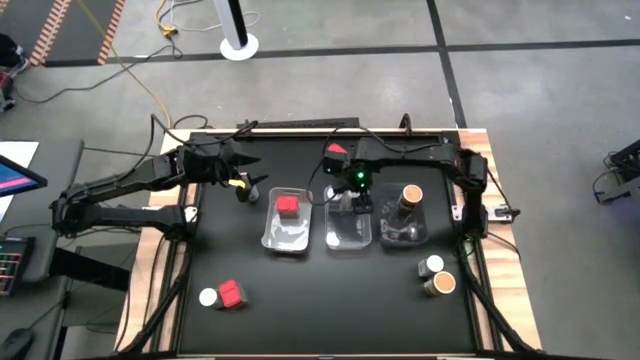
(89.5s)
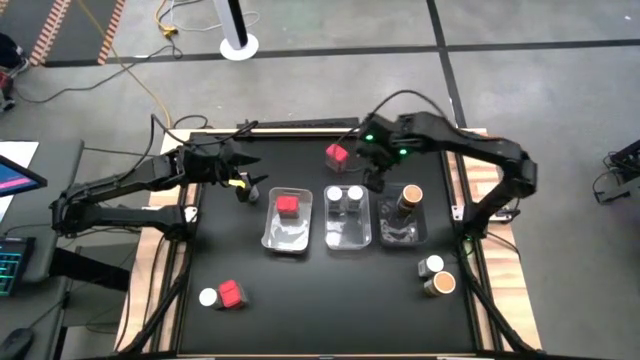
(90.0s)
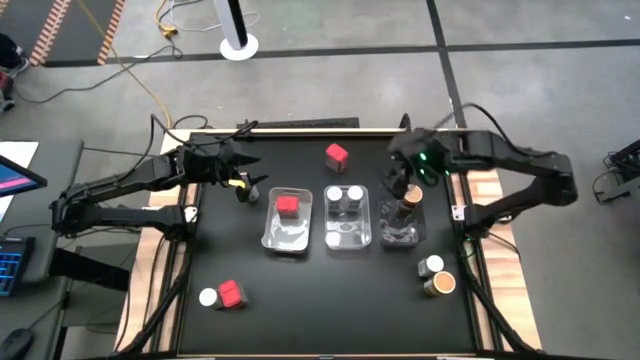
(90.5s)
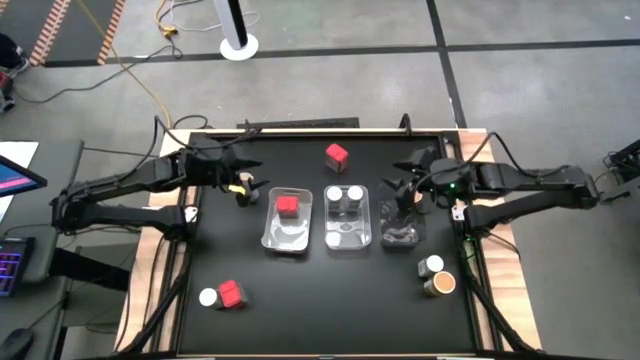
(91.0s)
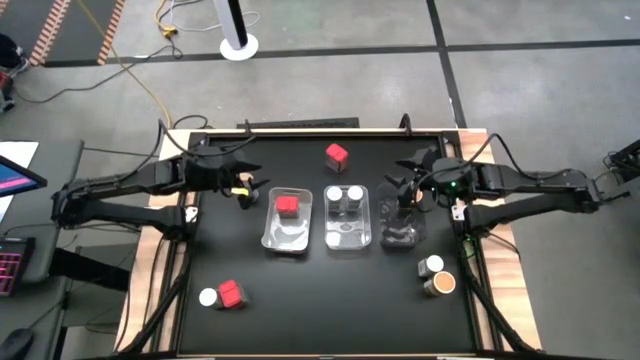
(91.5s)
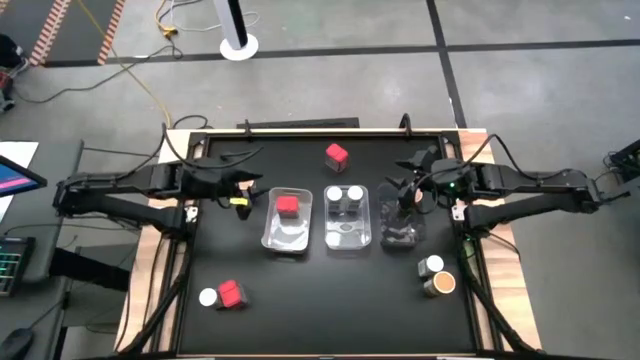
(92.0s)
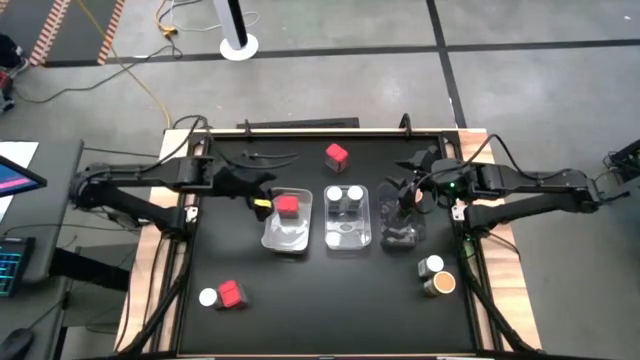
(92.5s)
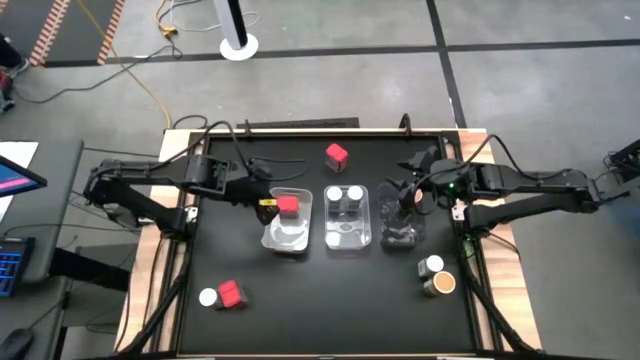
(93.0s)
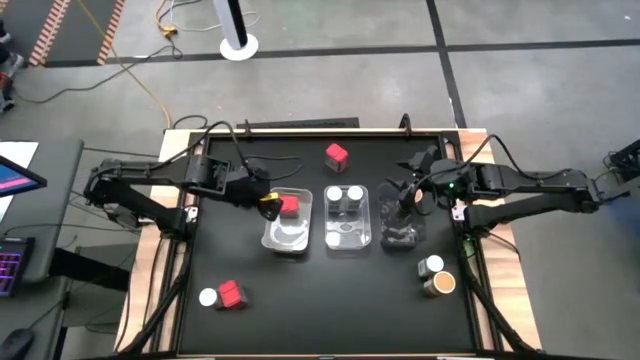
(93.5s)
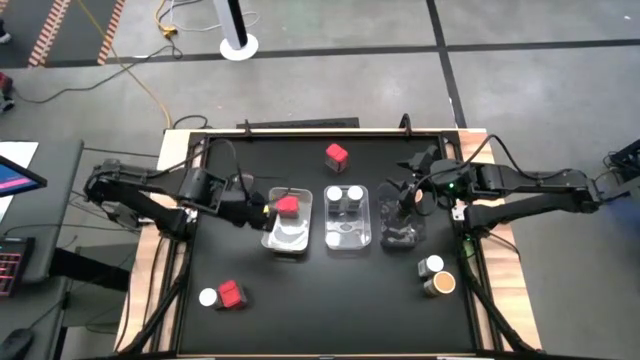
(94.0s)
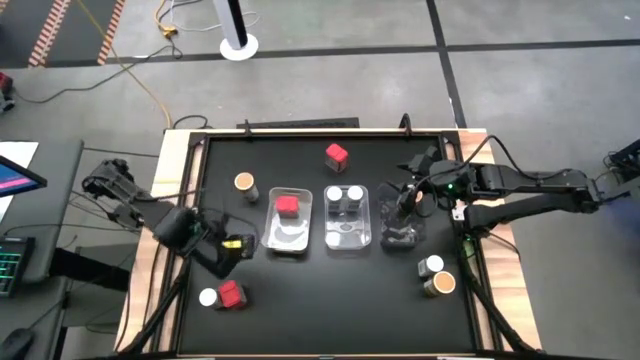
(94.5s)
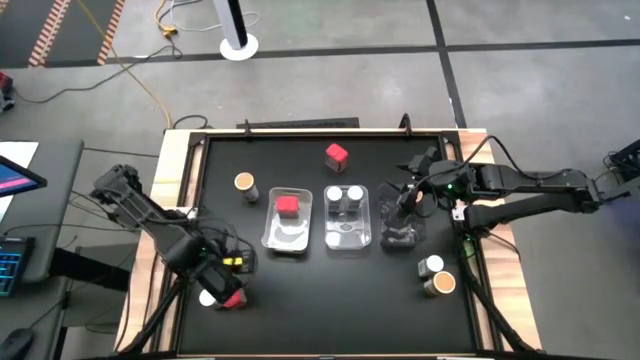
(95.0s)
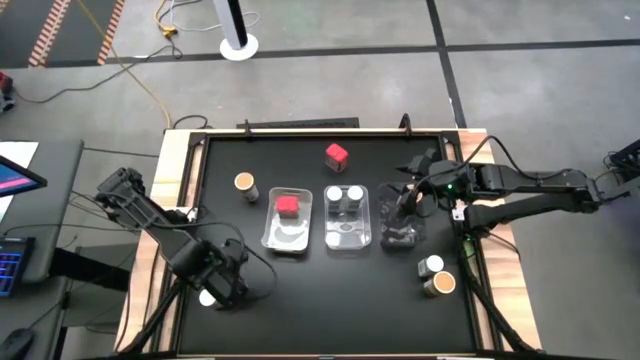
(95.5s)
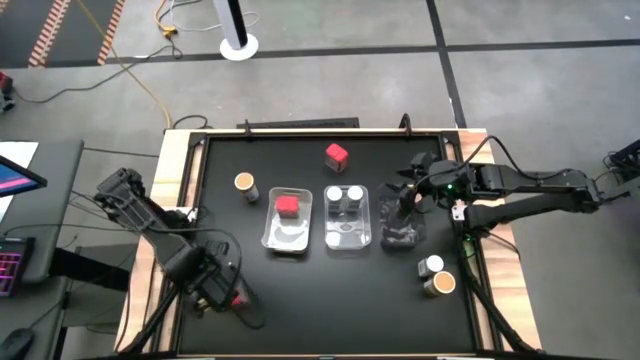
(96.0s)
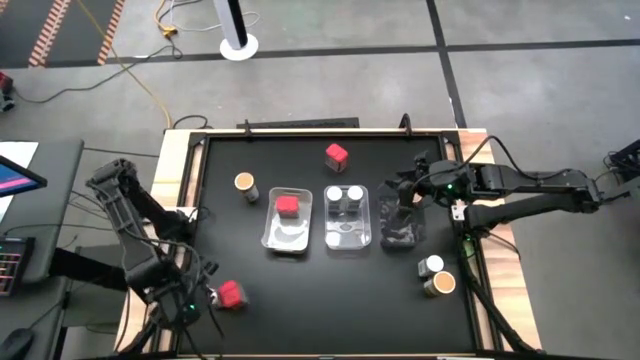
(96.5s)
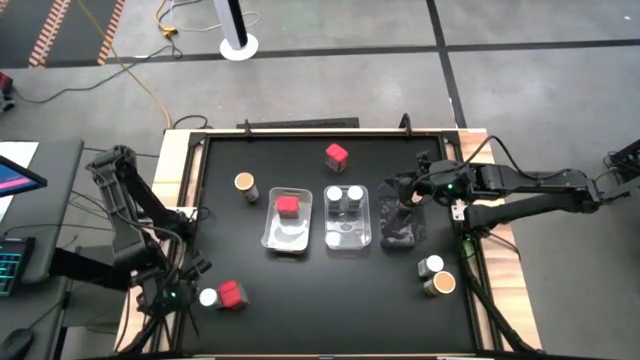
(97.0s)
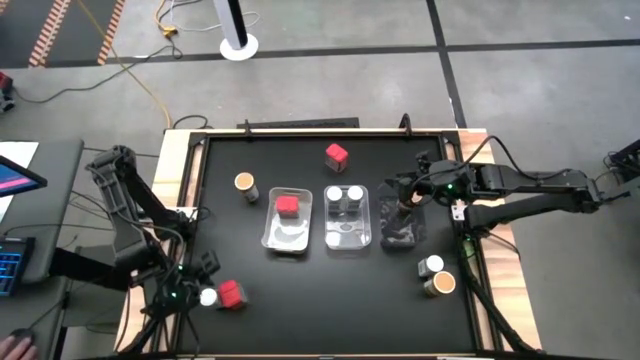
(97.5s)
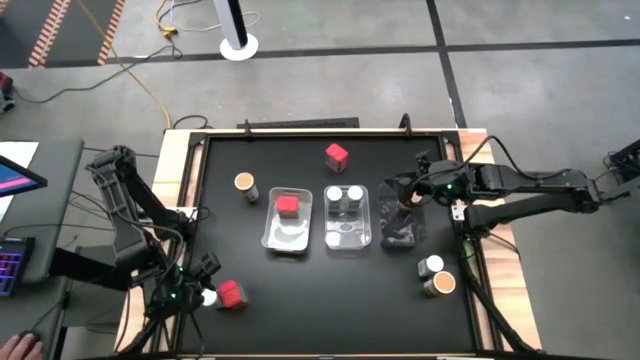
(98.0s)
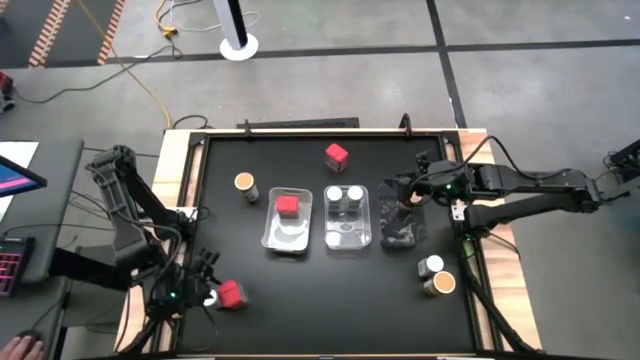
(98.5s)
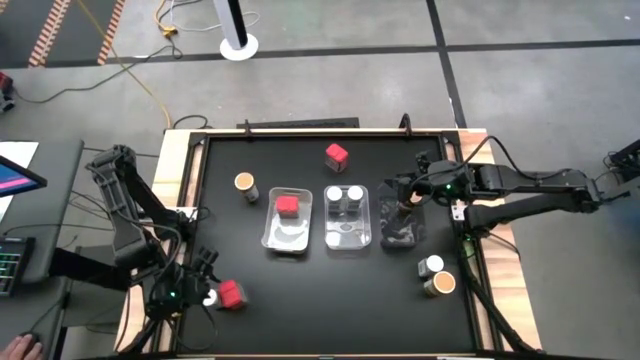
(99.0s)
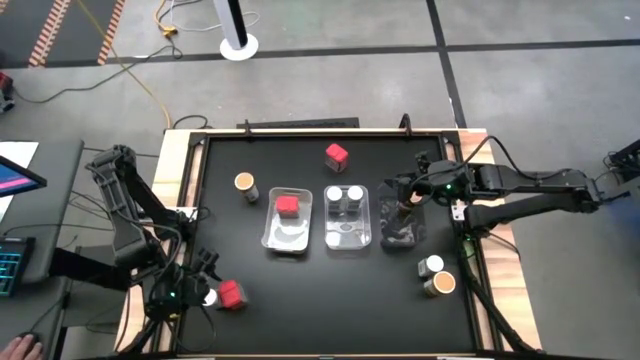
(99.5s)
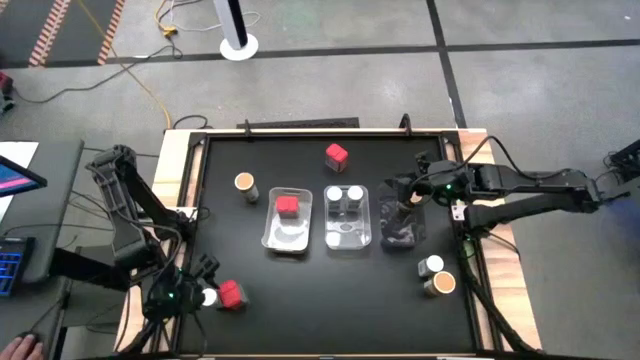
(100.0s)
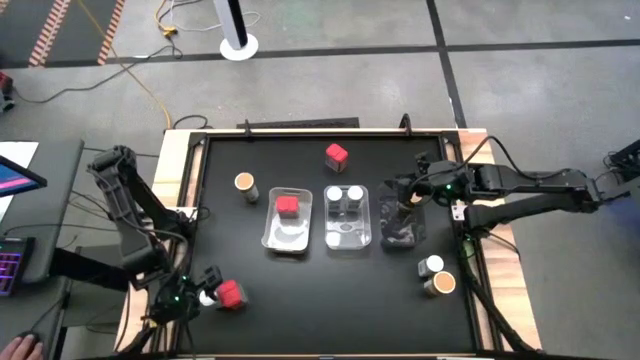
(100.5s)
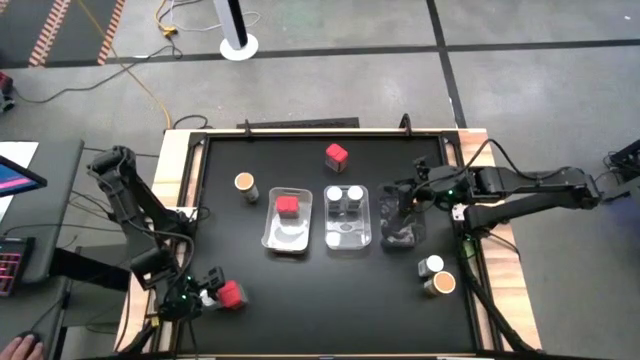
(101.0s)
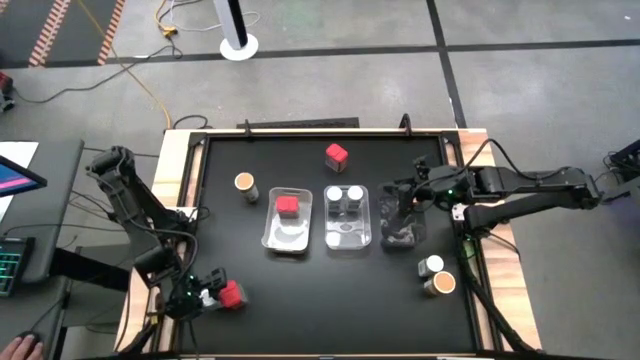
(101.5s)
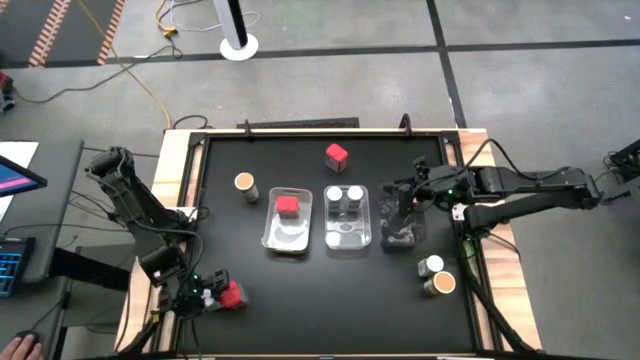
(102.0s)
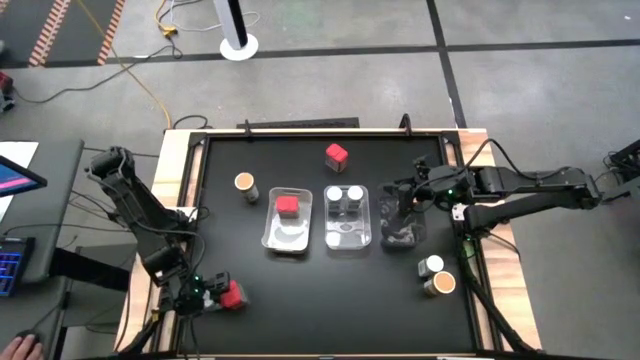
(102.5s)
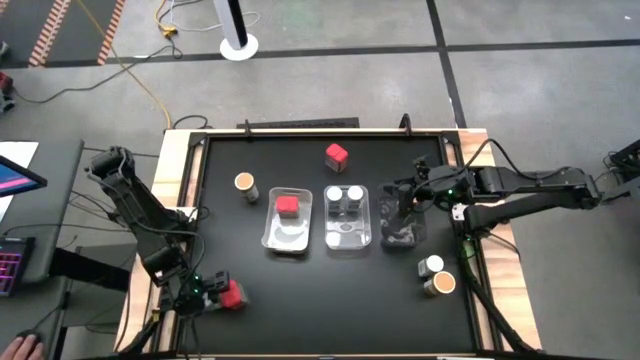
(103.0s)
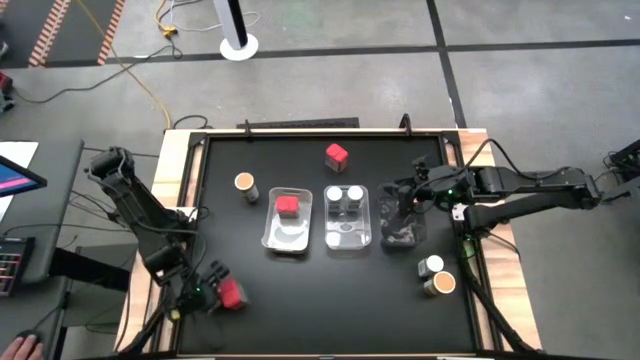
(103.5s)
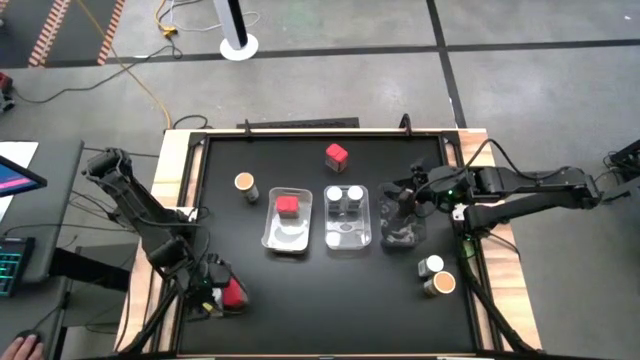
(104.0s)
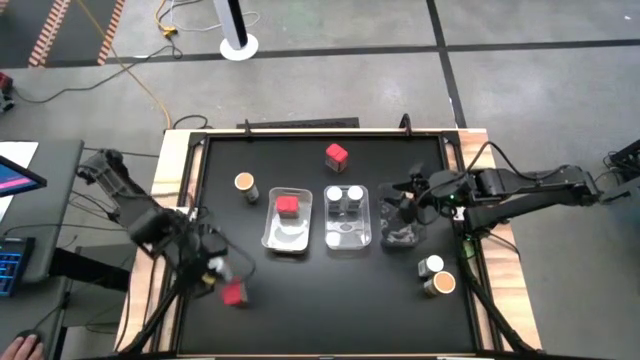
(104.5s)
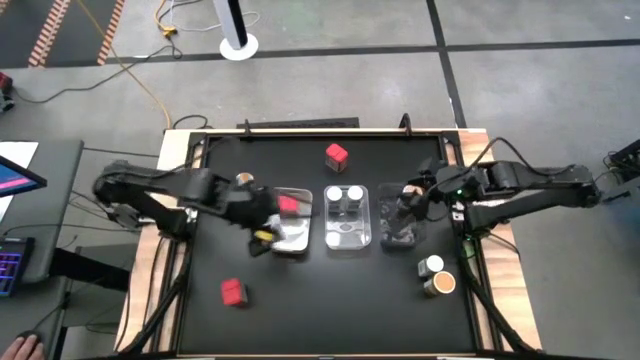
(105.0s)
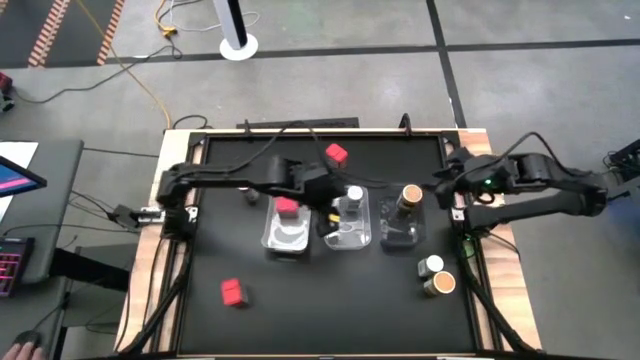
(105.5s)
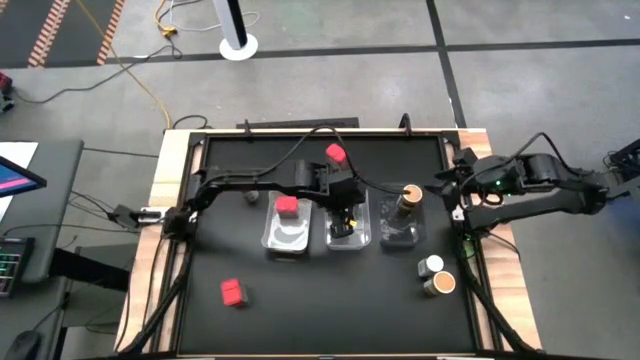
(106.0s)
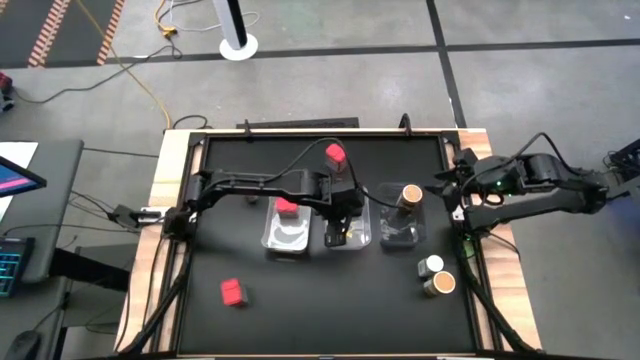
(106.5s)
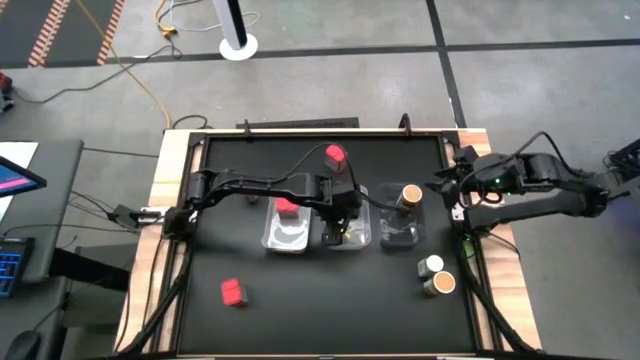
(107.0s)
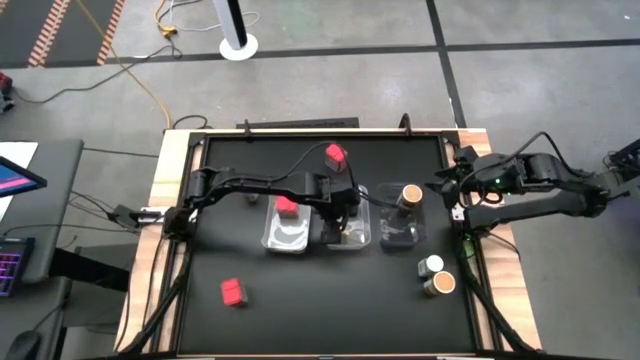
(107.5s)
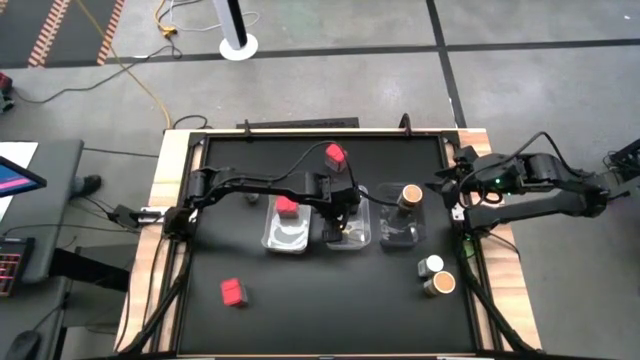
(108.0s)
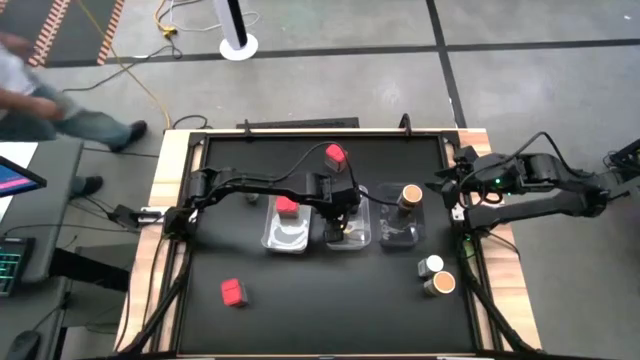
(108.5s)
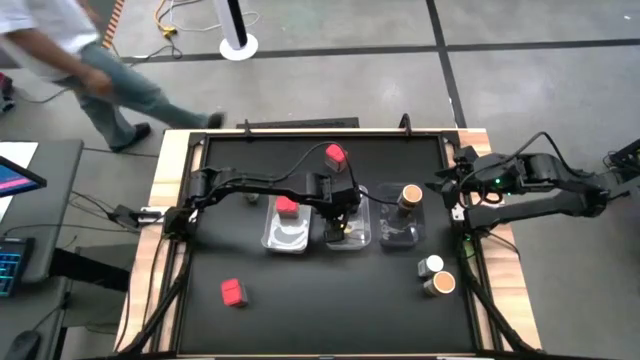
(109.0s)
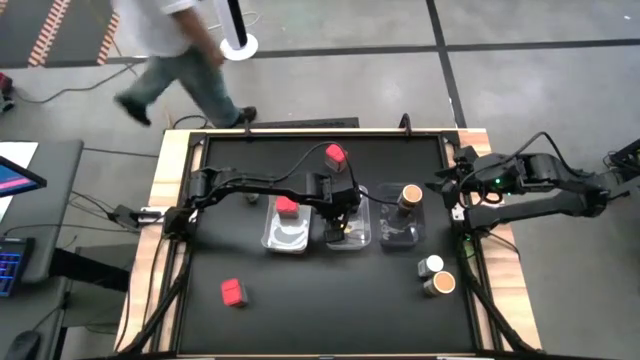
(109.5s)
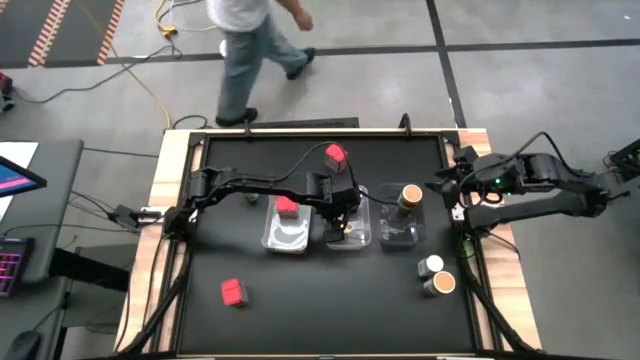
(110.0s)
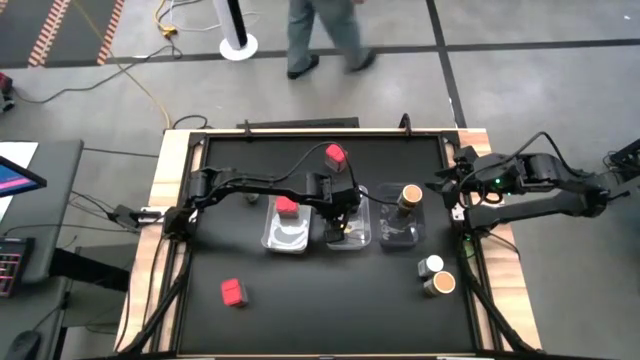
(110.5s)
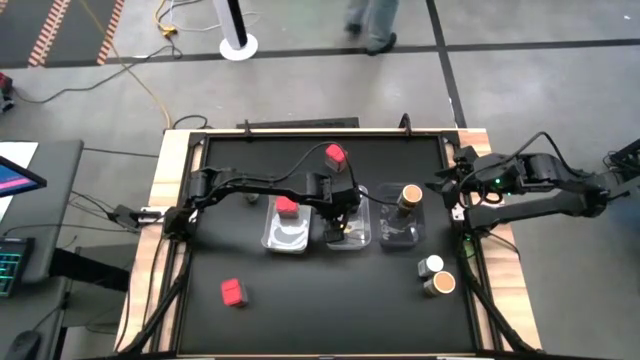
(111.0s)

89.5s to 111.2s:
Task: Sort spices by type
Put the left white seasoning bottle into the transparent bin
